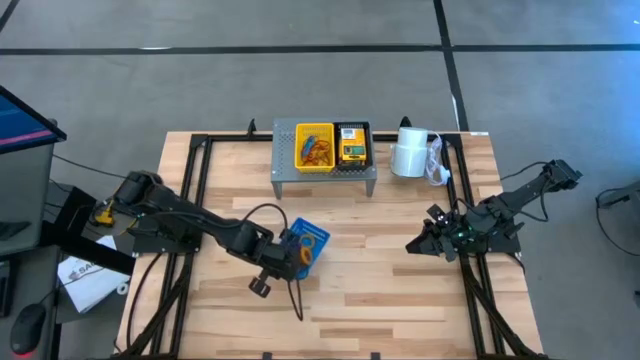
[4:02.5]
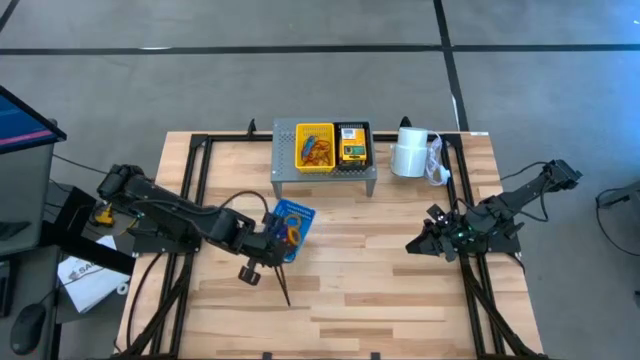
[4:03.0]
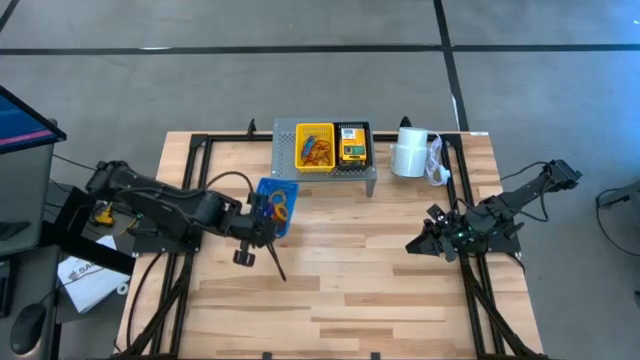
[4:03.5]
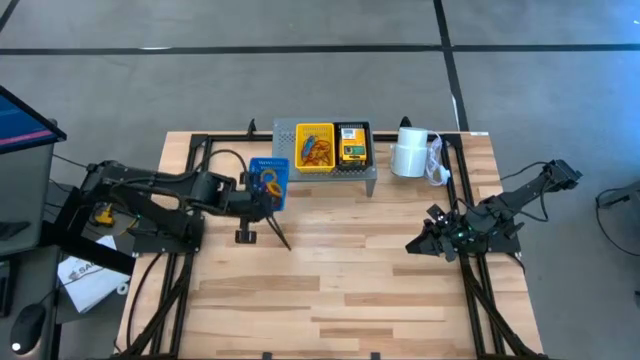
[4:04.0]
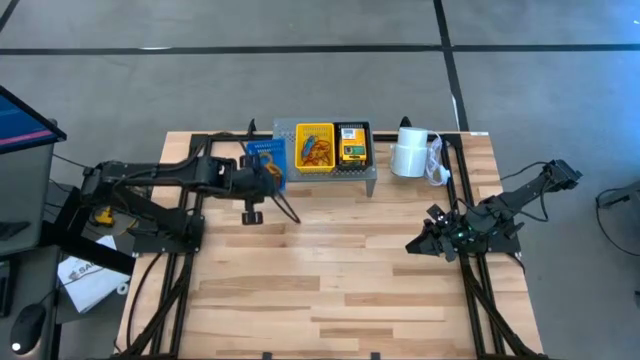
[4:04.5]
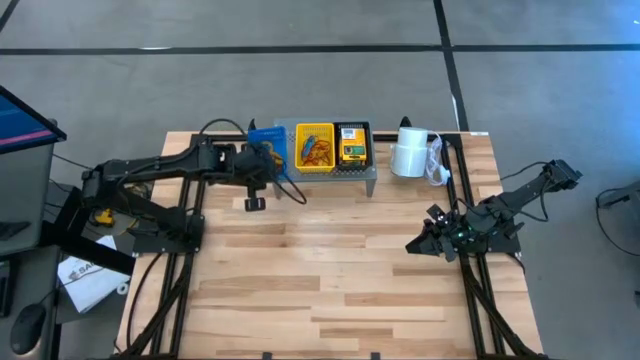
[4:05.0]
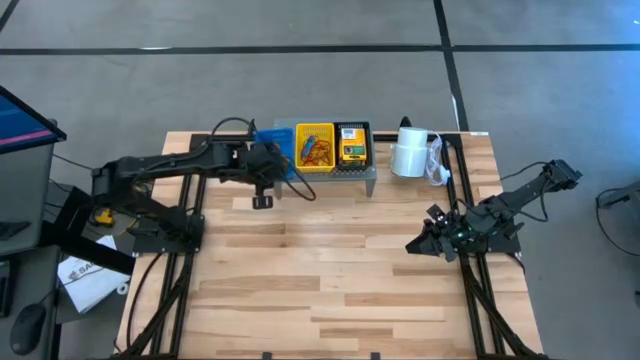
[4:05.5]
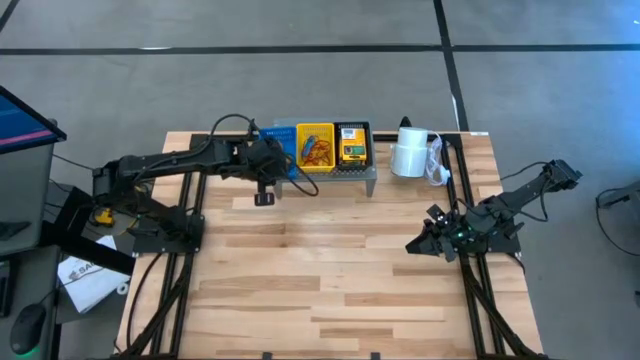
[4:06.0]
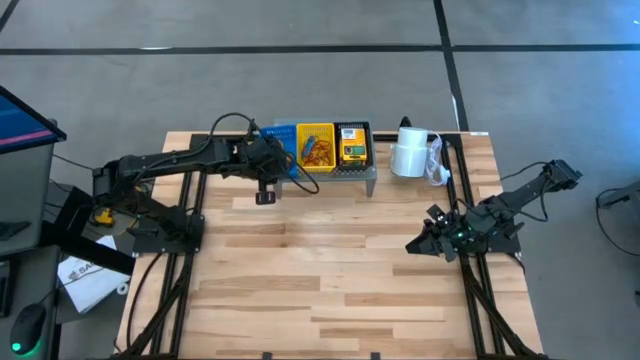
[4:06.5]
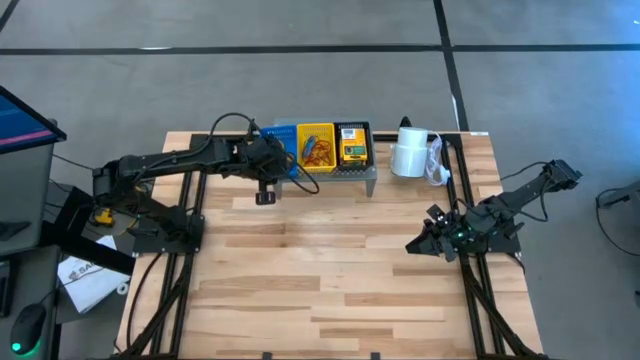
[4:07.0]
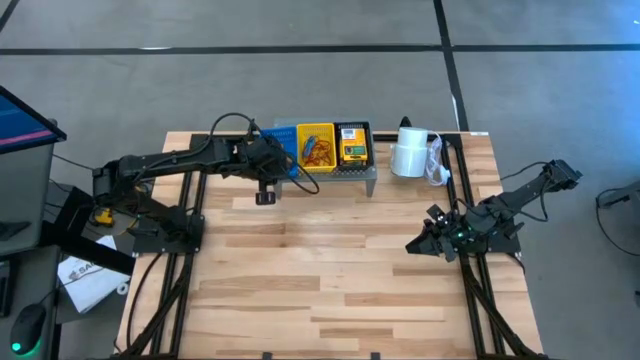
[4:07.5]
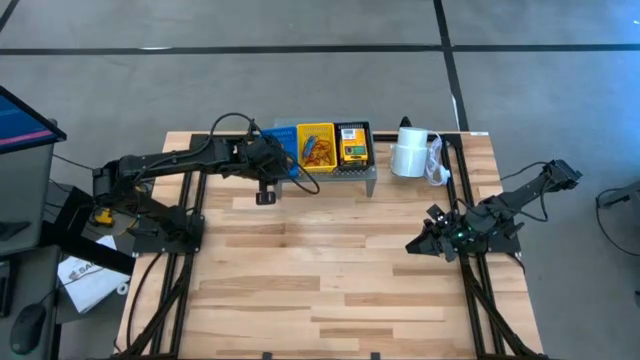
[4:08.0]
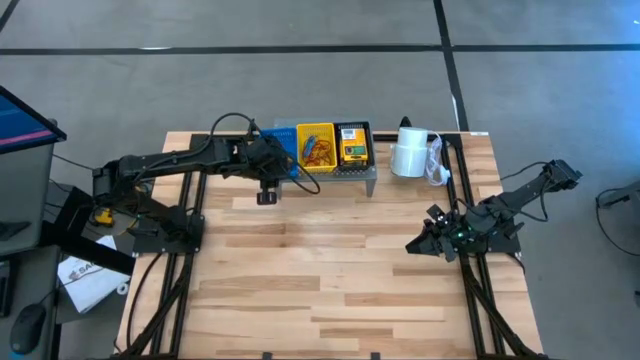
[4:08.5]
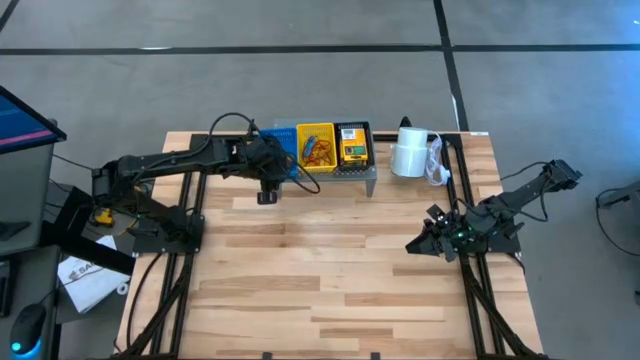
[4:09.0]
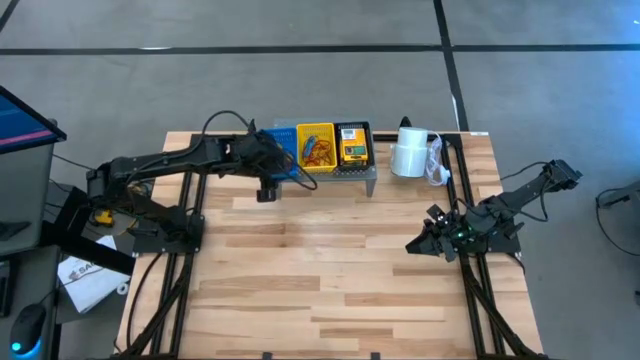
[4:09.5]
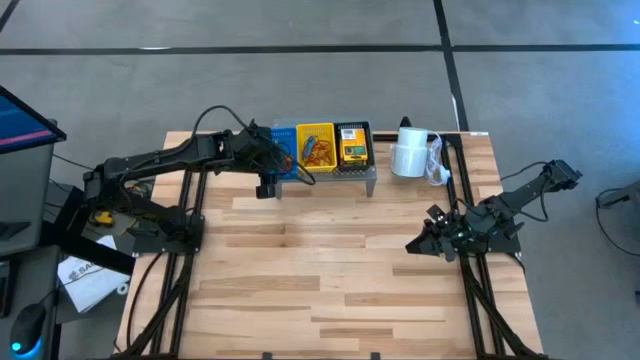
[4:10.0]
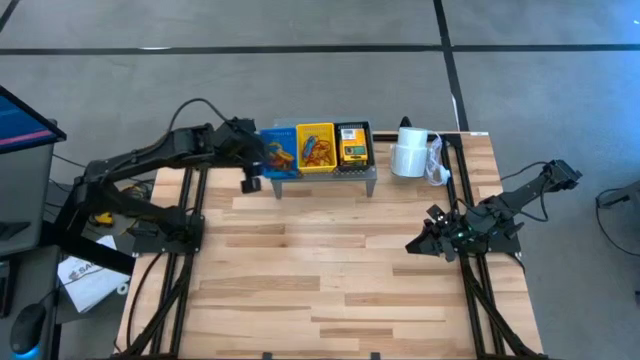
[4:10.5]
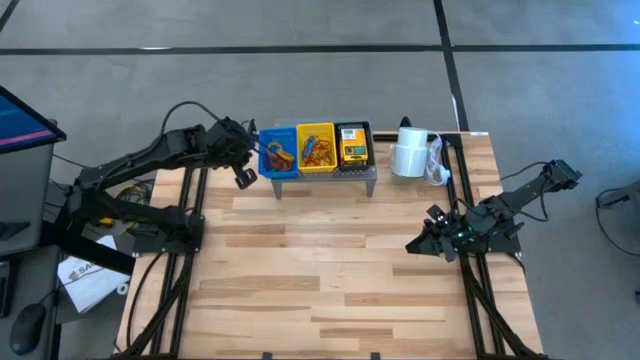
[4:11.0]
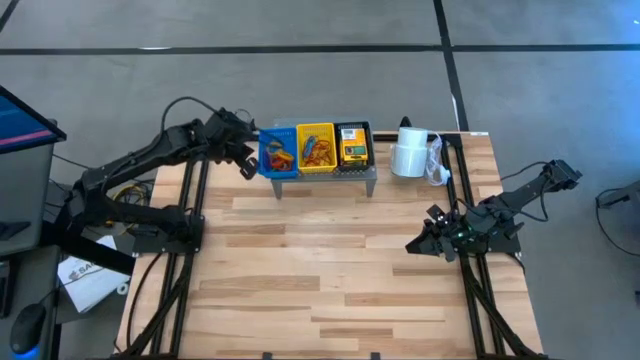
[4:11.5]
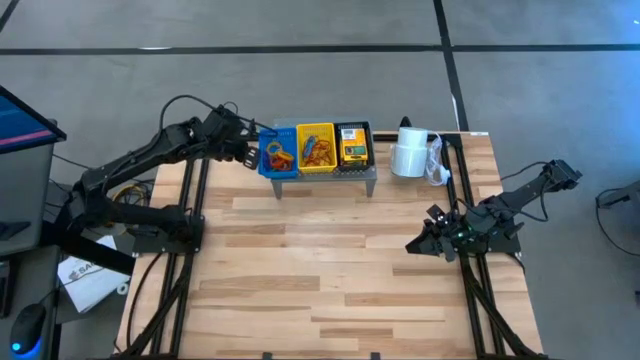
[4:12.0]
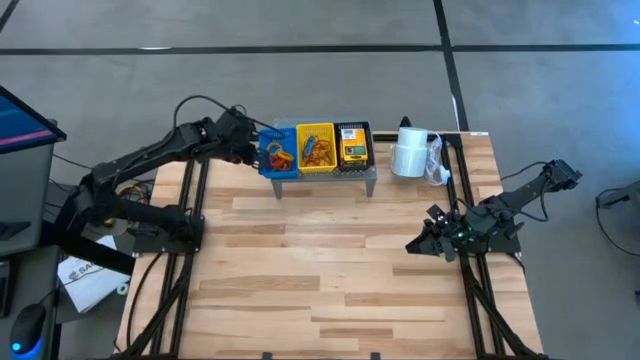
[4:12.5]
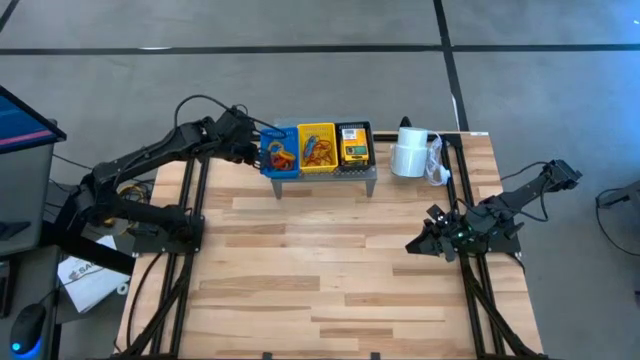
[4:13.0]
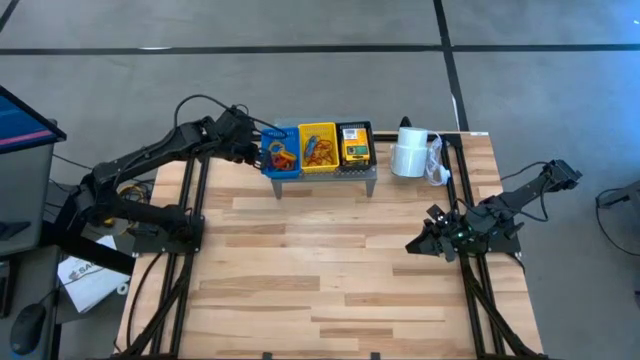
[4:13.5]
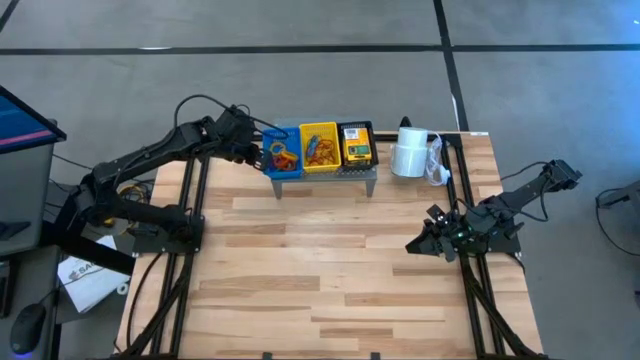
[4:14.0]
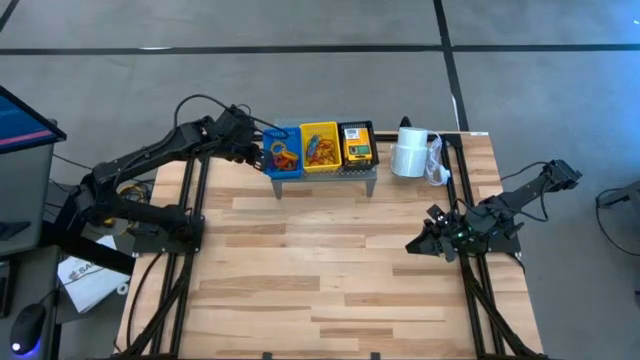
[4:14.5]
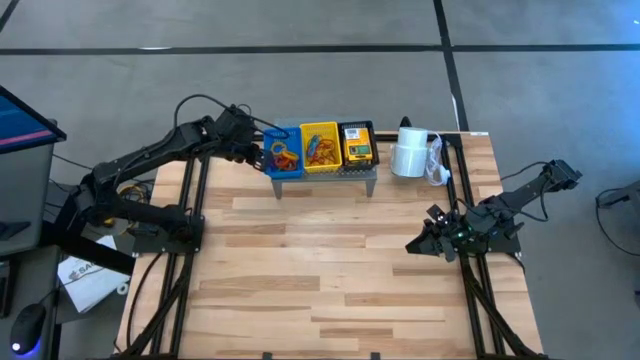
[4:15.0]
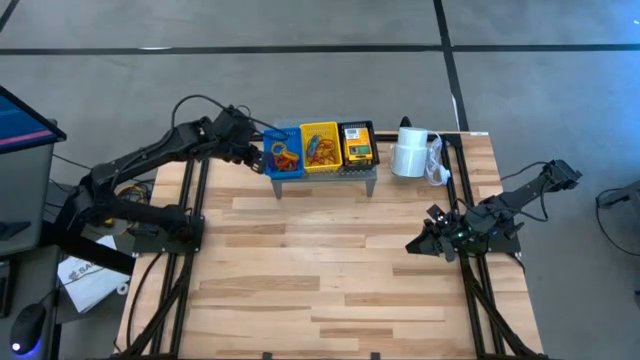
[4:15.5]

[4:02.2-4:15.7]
Task: Pick & Place Office Desk Supplies
Put the blue basket on the shelf

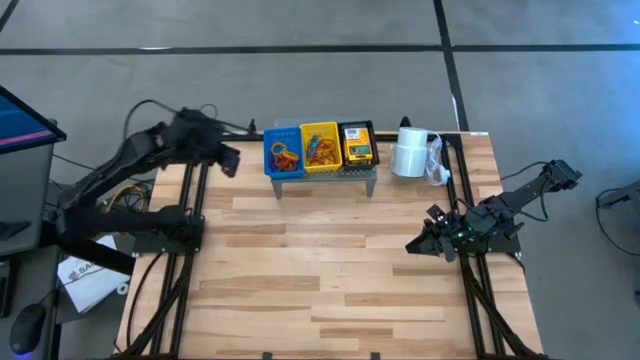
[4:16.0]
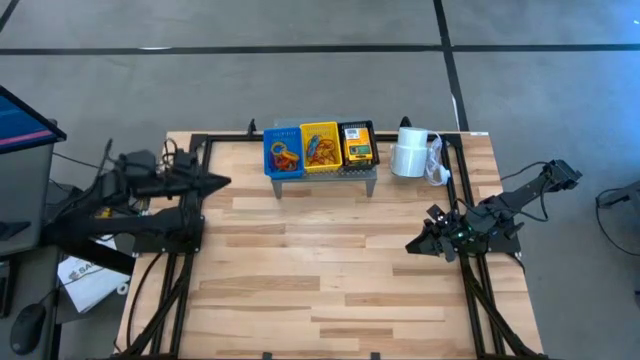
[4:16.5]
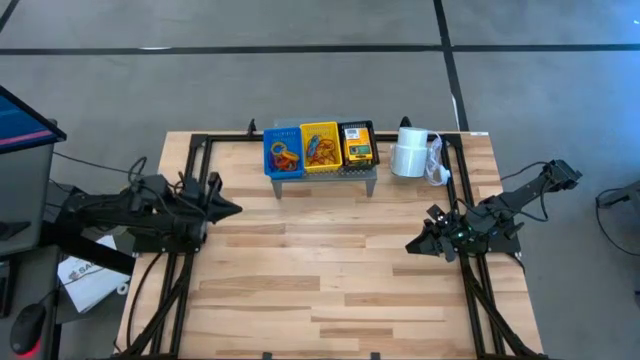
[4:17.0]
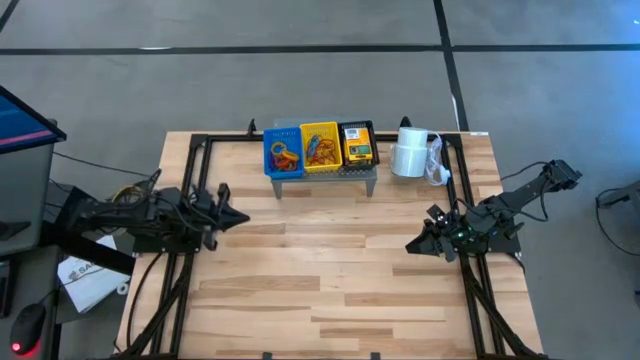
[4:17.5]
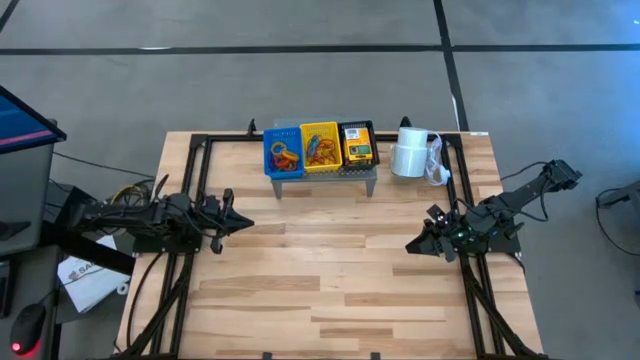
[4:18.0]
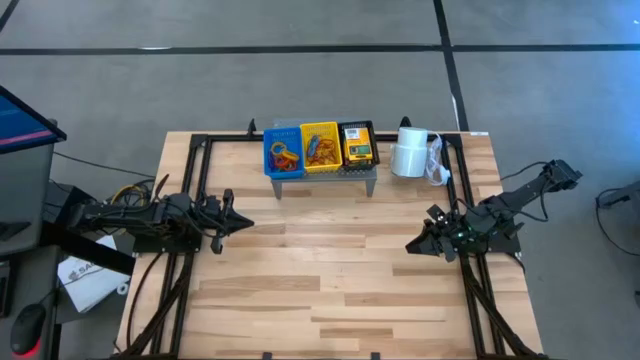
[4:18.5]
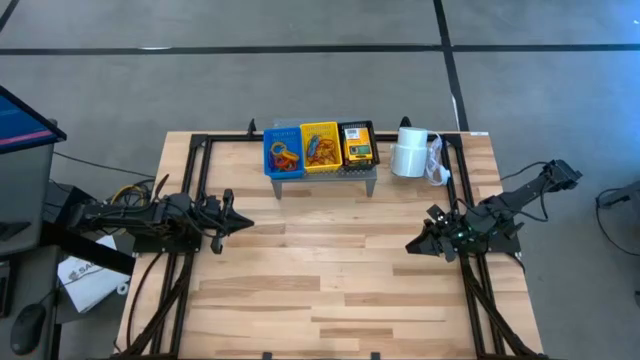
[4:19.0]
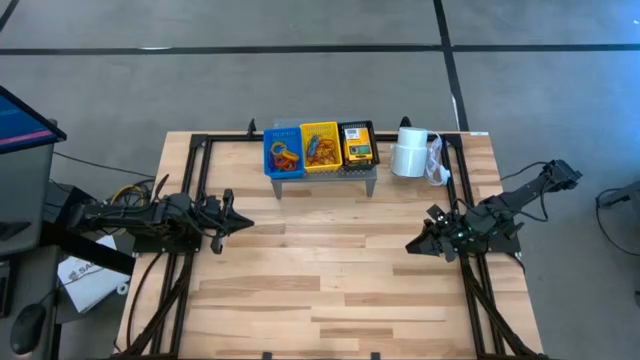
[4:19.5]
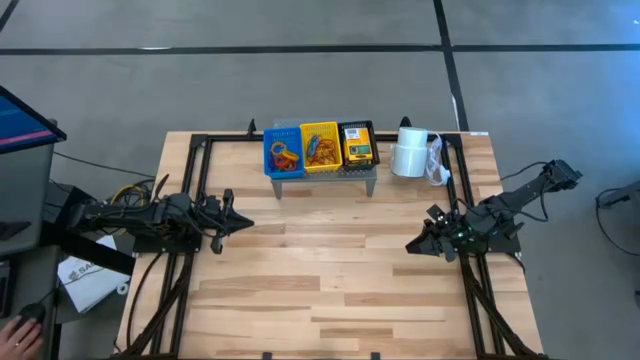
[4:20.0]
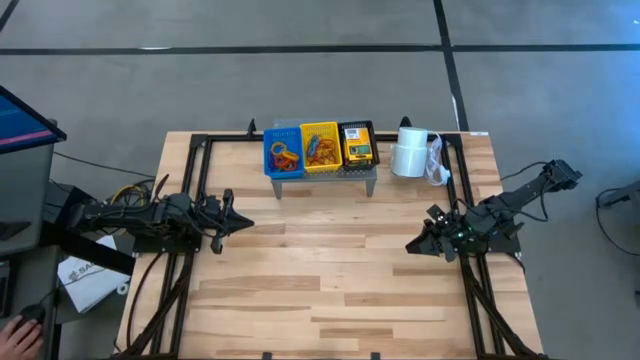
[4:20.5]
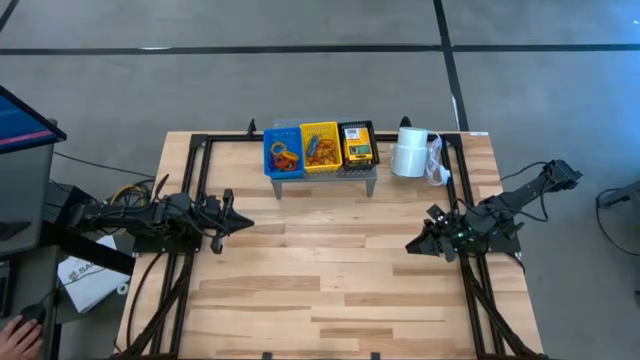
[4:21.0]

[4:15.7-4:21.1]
Return to Home Position
